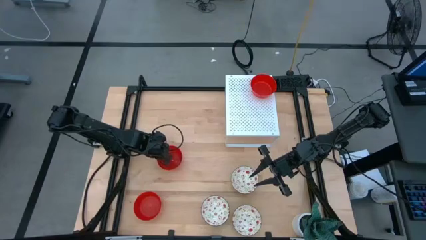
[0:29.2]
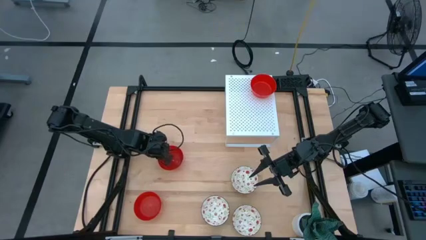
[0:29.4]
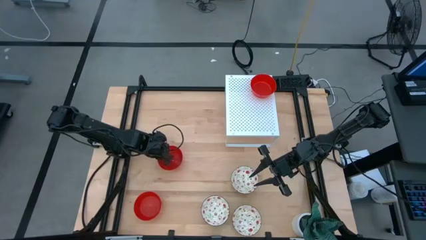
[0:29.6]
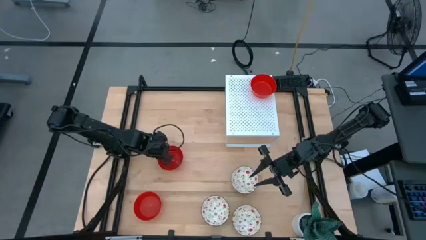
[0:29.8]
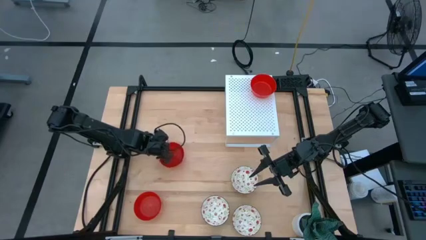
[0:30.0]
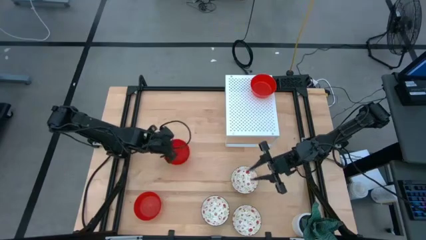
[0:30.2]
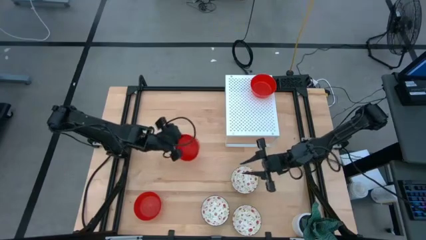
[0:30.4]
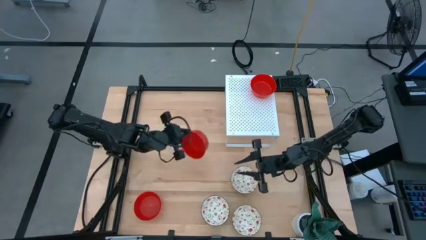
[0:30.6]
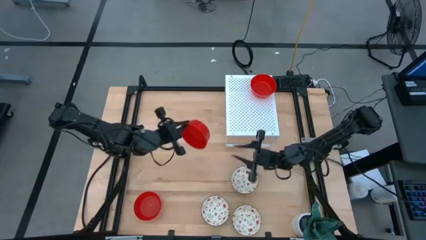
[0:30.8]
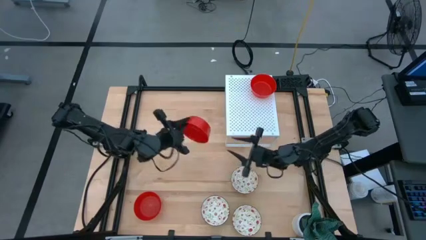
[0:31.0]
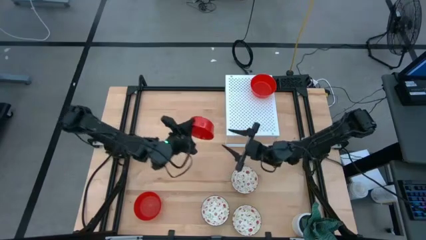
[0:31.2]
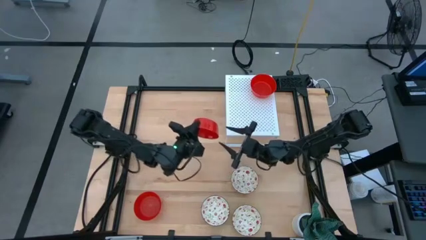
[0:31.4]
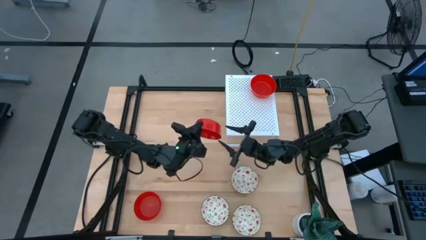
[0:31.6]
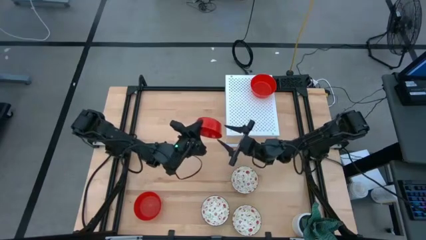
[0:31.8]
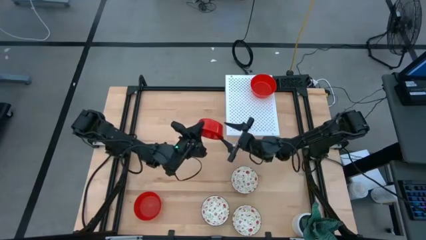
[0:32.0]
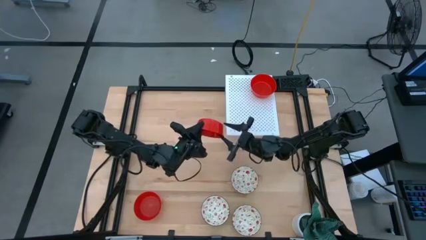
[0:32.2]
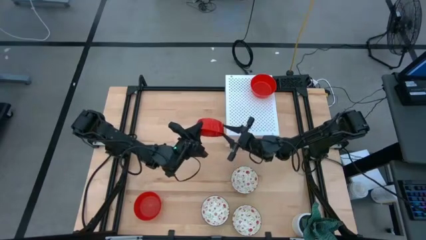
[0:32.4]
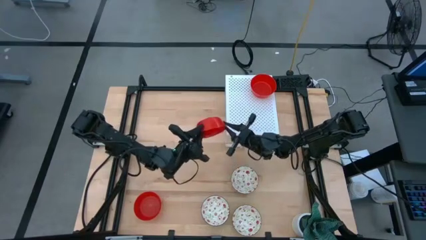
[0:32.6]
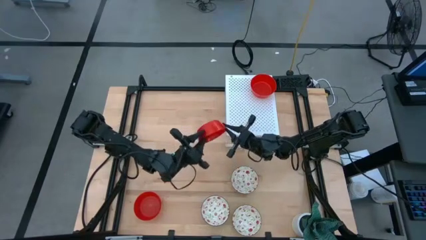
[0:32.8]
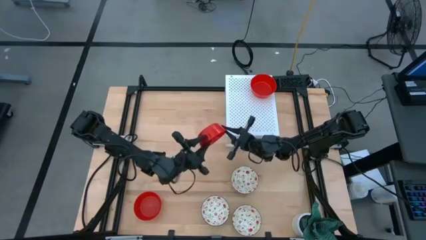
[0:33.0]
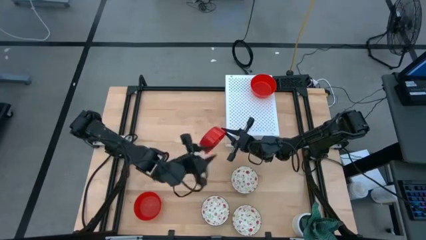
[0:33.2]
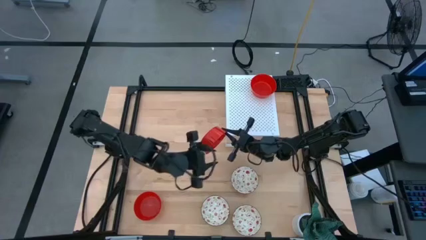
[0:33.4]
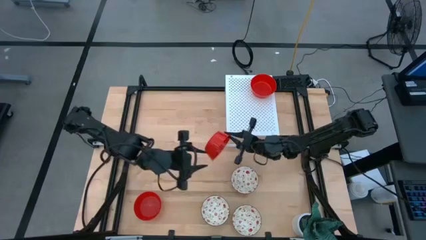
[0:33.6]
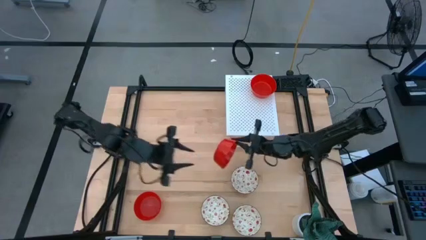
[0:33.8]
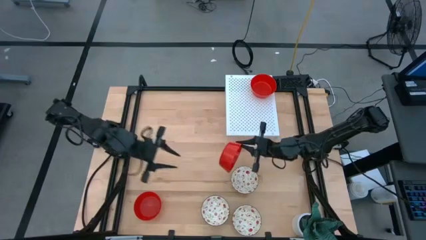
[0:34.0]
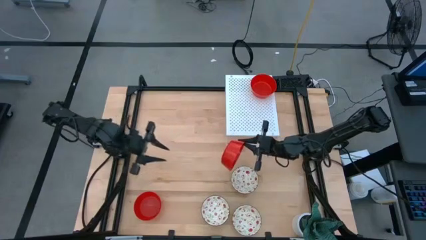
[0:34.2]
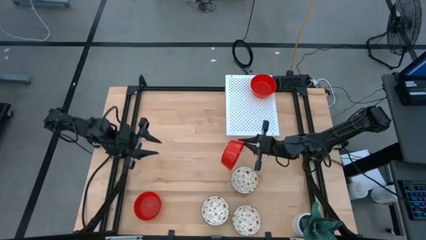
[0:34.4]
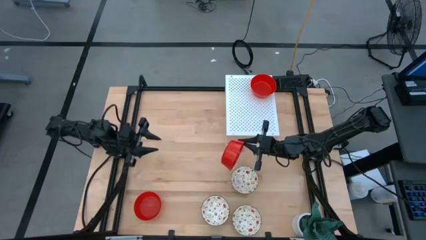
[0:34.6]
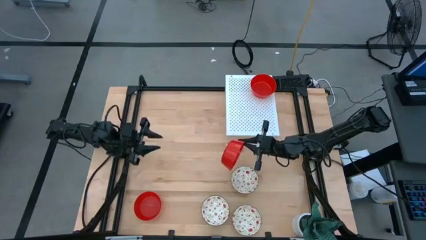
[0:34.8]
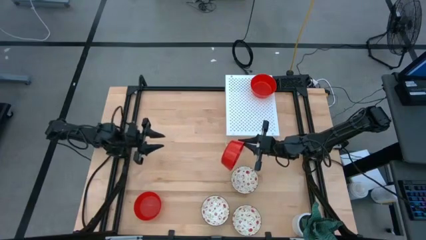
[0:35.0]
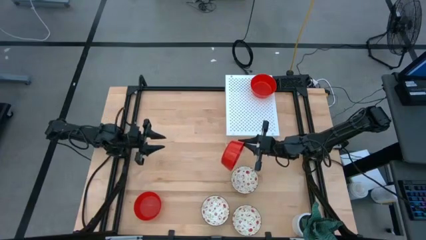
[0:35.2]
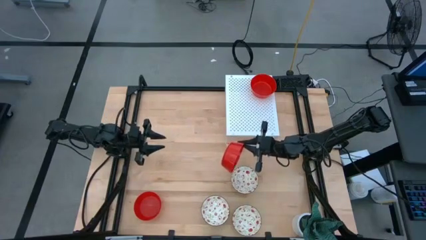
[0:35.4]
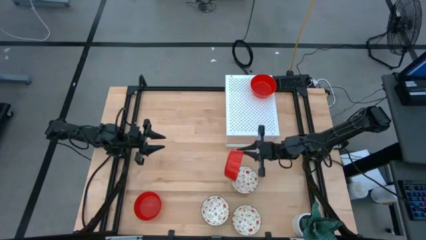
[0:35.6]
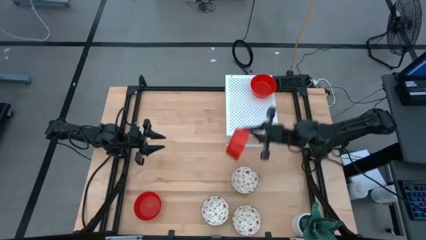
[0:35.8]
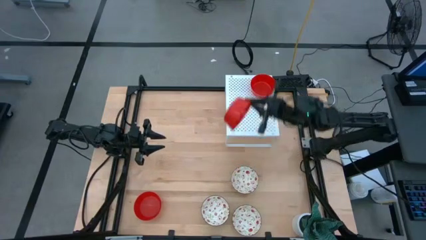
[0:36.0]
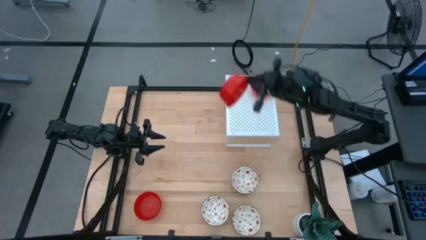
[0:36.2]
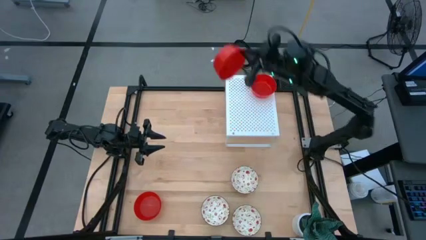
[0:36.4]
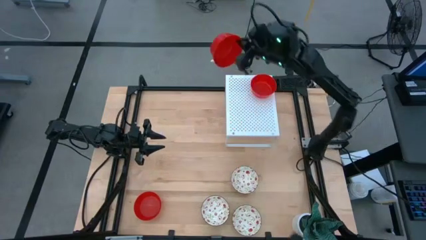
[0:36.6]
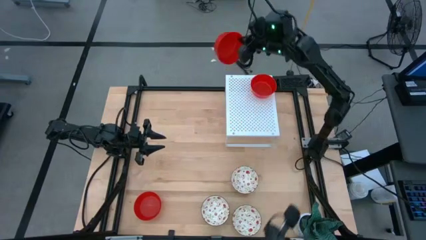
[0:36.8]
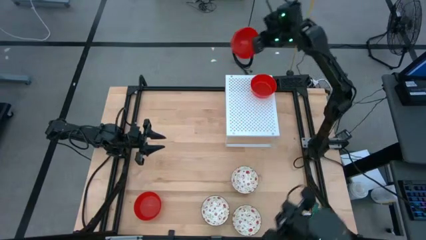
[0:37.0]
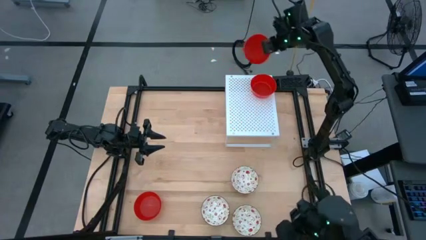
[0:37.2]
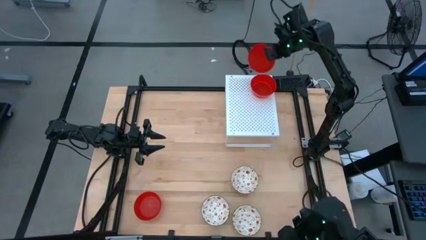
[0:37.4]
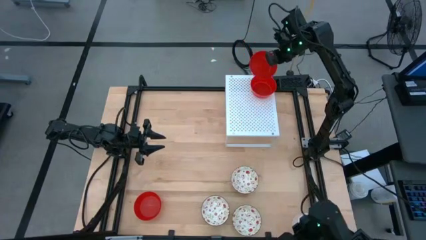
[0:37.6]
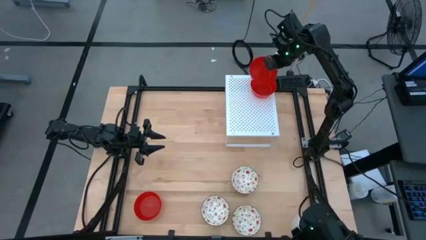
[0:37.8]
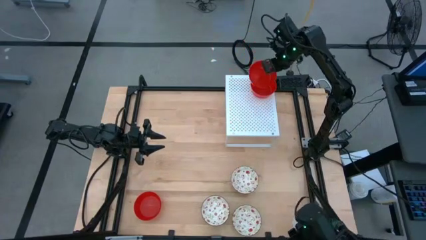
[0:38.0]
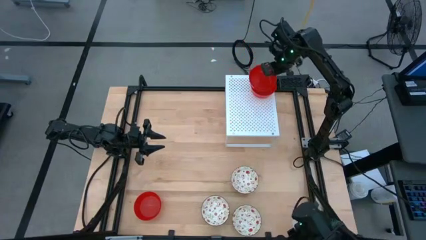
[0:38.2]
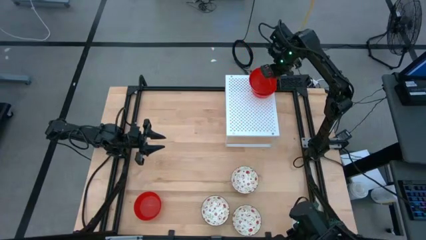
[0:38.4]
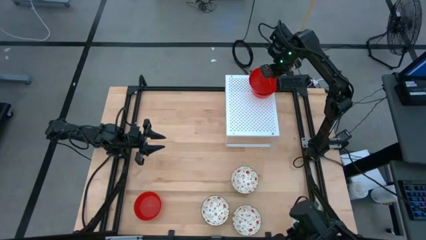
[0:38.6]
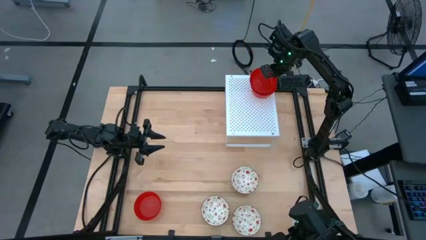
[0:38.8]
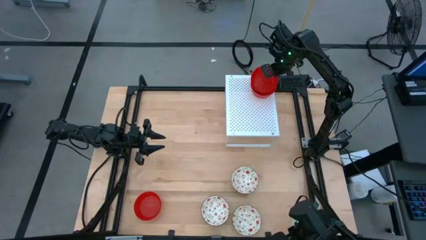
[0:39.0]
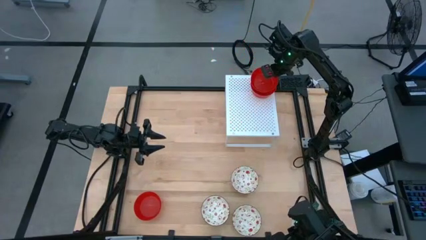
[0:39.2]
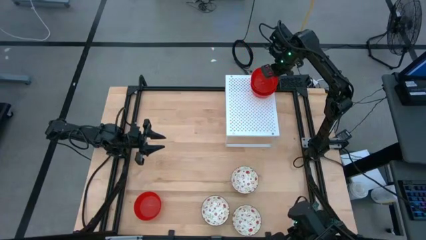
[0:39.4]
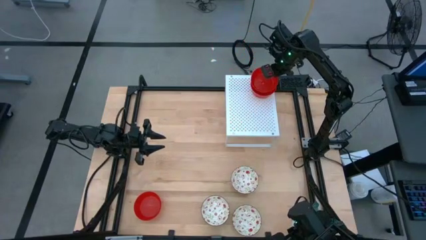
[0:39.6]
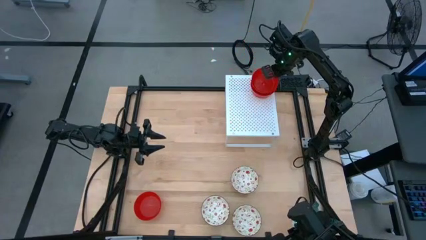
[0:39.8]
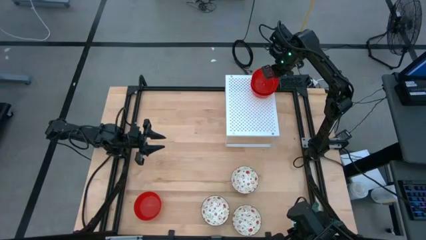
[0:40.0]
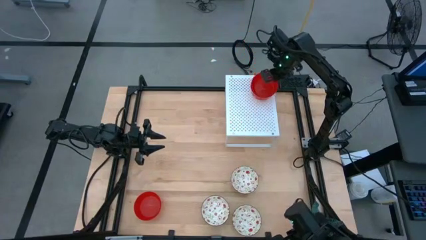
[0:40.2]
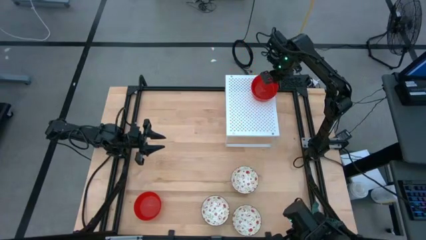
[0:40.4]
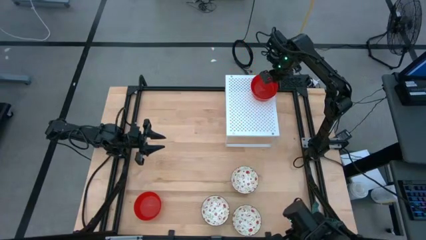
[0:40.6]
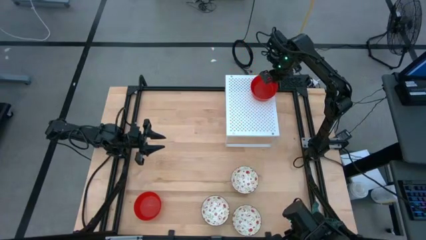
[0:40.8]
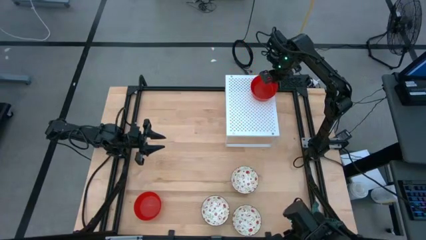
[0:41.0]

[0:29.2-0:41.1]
Task: Pick & Place Mini bowls
Stack the top red bowl on the red bowl on the shelf

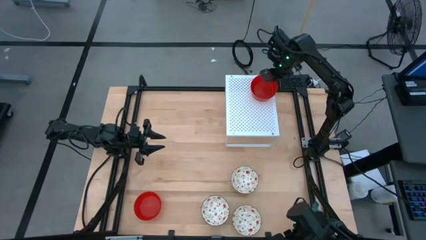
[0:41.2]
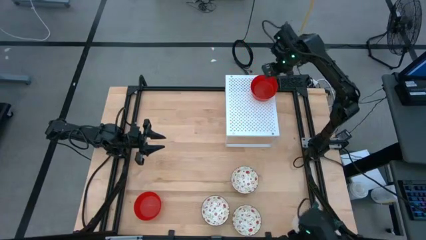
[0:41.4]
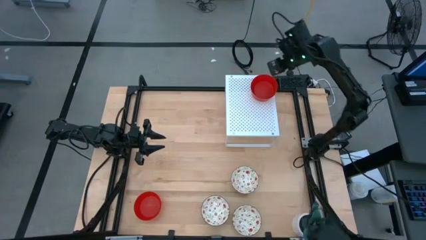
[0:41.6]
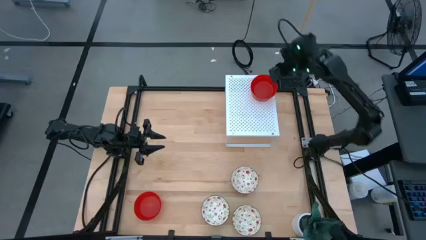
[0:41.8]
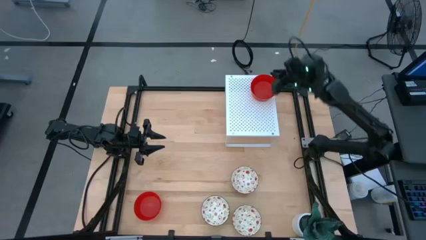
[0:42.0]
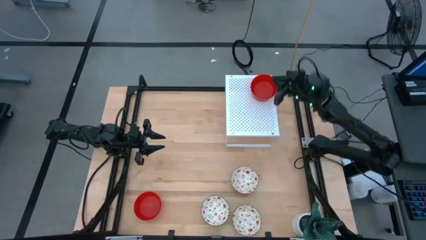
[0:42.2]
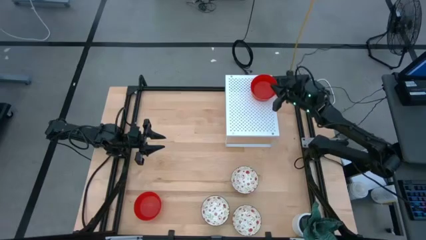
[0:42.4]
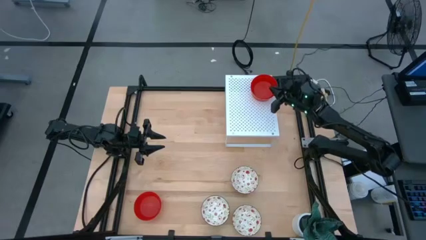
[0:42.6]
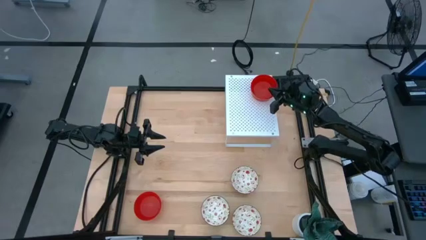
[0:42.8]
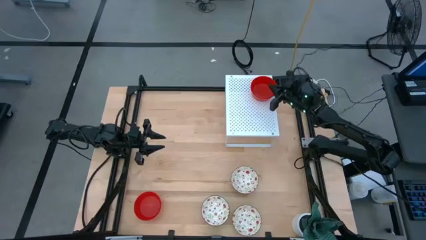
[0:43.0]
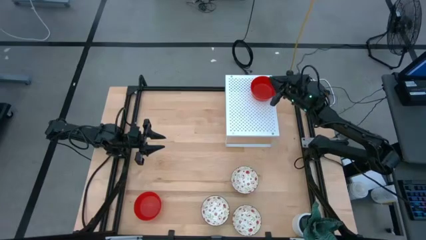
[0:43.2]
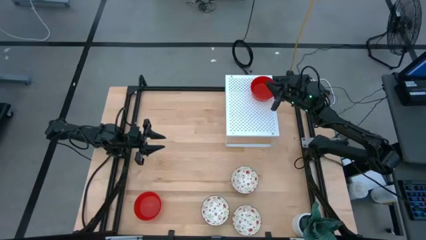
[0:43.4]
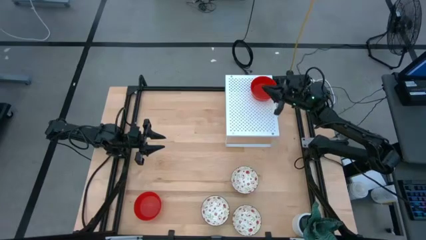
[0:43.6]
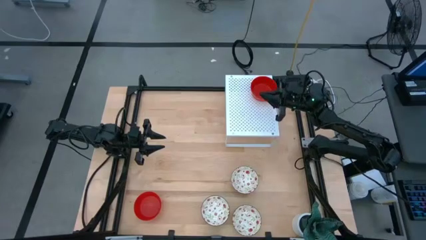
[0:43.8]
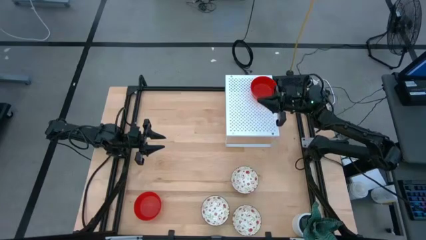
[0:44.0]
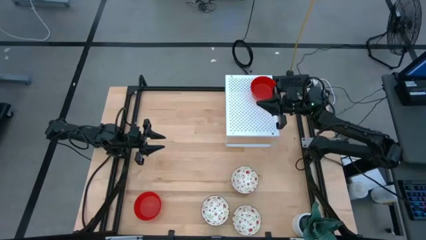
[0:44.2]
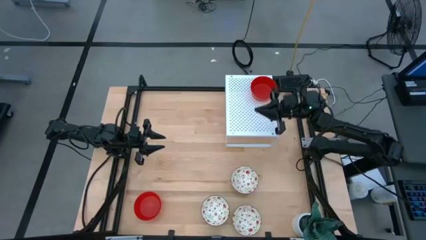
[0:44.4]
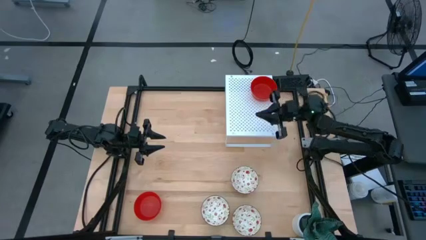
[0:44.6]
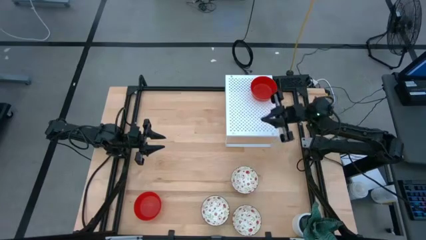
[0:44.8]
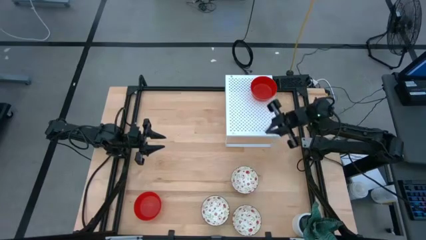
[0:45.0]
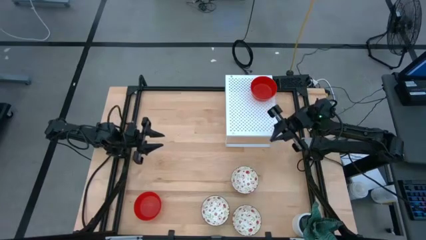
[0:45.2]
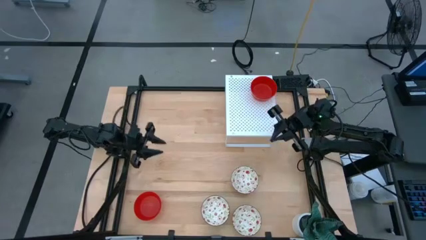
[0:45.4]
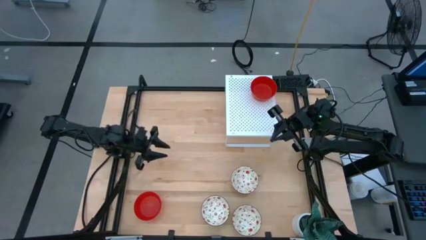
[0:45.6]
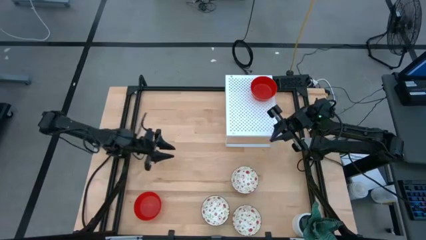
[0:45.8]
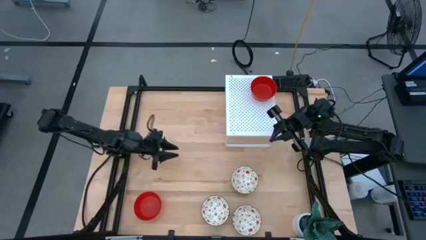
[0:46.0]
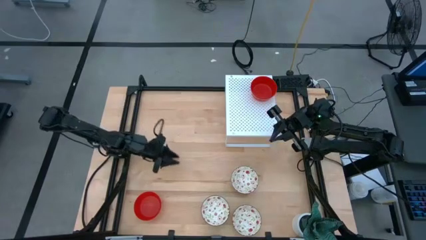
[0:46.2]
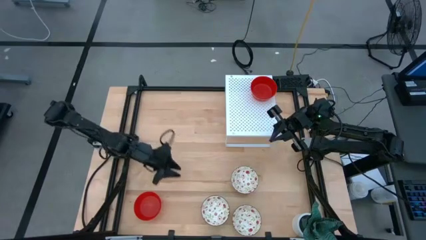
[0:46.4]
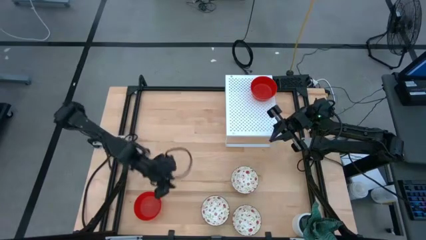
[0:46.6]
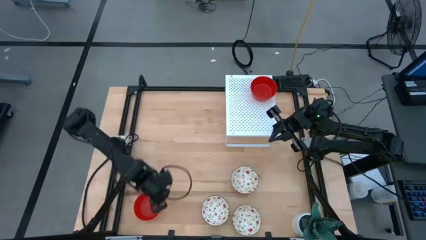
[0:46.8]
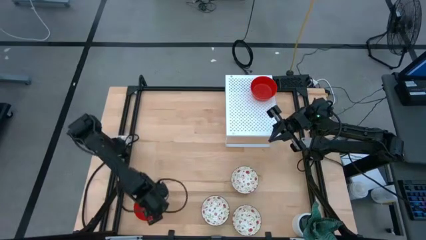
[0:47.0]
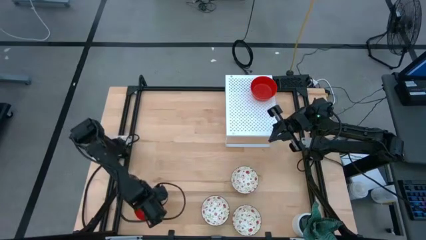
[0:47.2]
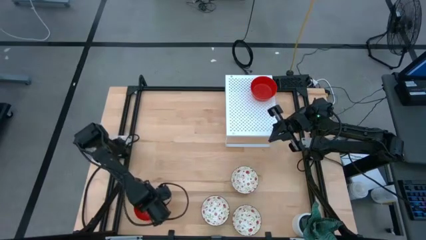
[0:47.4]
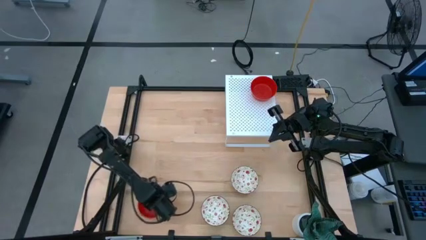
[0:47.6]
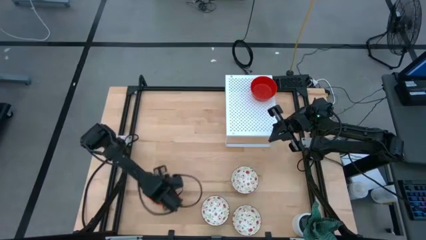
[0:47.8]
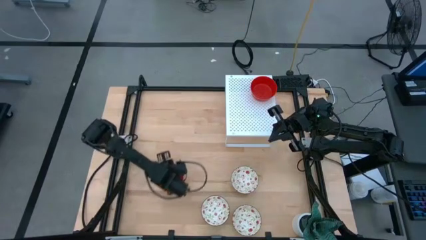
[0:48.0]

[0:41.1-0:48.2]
Move the red bin to the middle of the table
